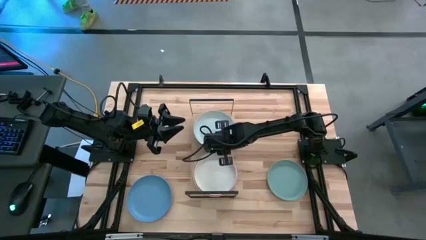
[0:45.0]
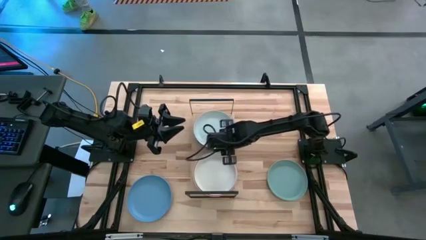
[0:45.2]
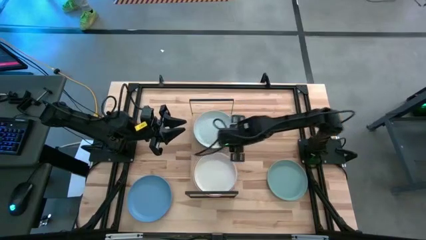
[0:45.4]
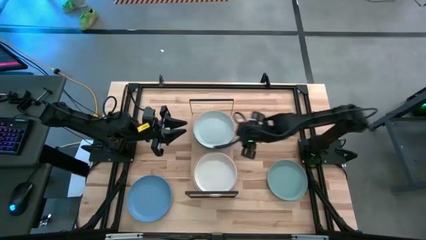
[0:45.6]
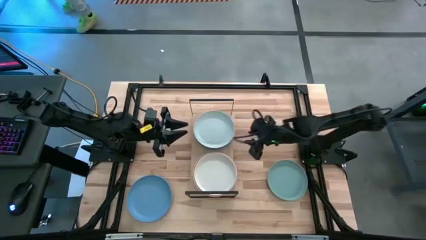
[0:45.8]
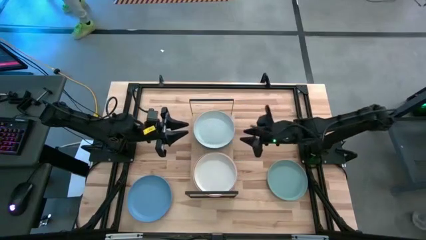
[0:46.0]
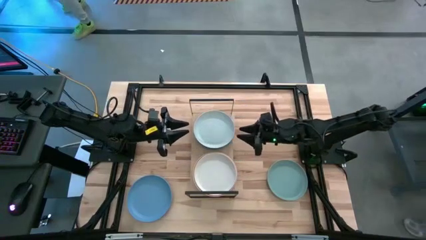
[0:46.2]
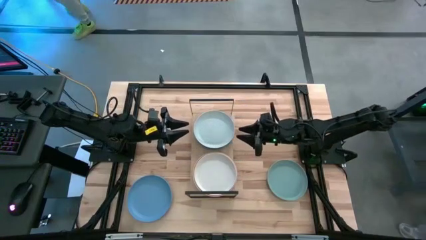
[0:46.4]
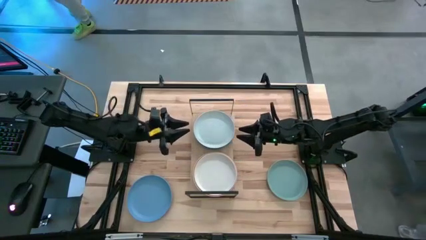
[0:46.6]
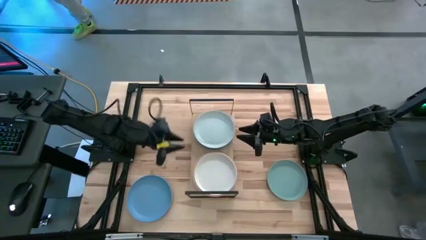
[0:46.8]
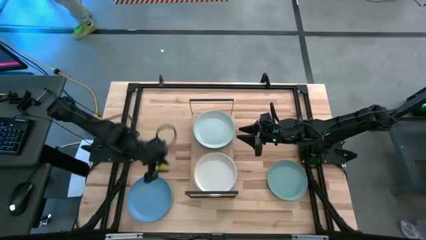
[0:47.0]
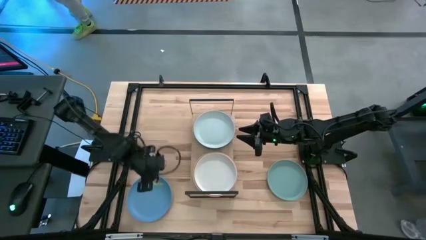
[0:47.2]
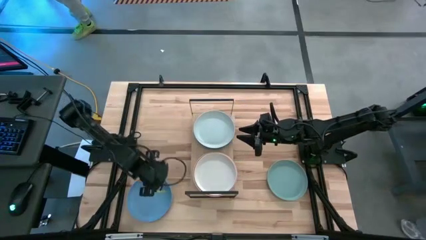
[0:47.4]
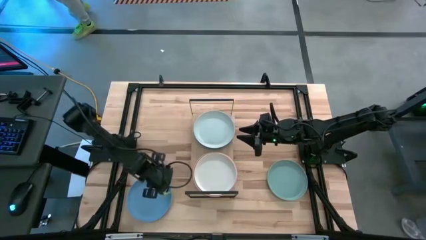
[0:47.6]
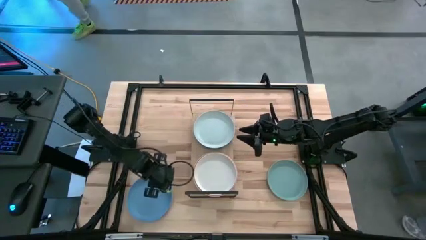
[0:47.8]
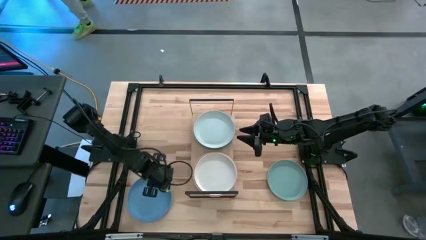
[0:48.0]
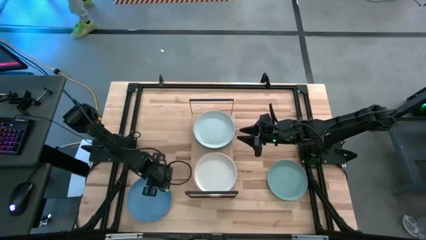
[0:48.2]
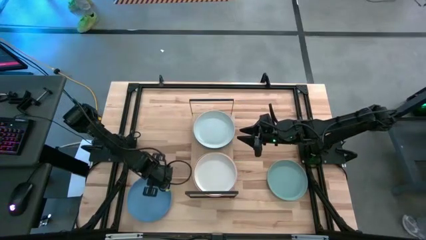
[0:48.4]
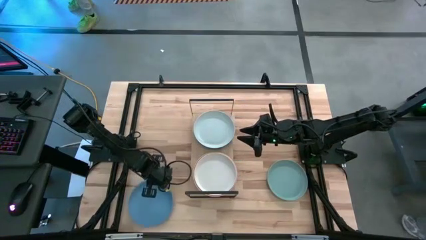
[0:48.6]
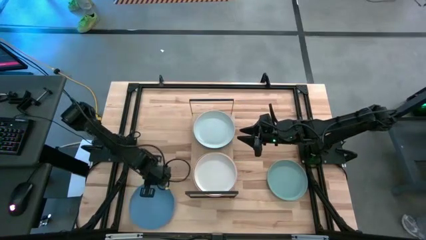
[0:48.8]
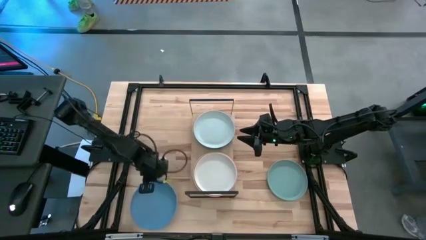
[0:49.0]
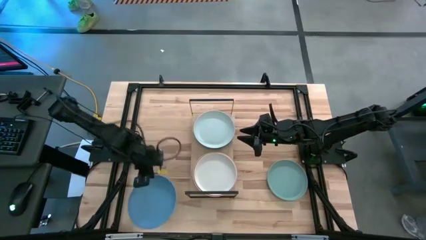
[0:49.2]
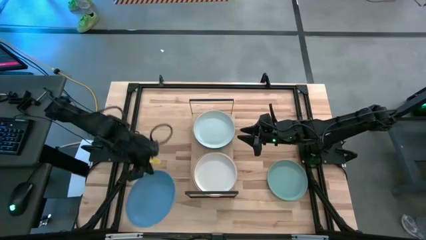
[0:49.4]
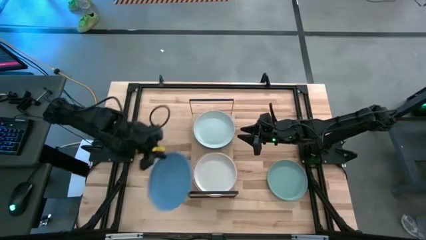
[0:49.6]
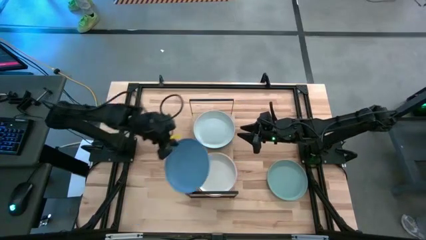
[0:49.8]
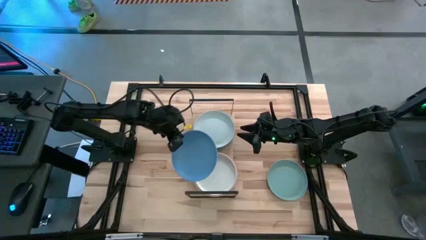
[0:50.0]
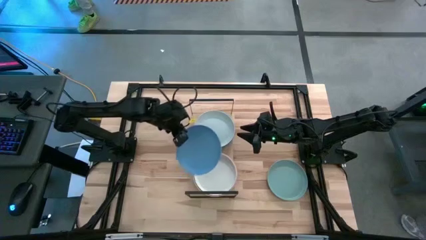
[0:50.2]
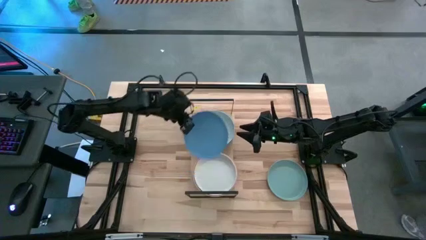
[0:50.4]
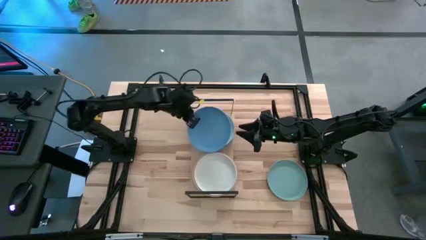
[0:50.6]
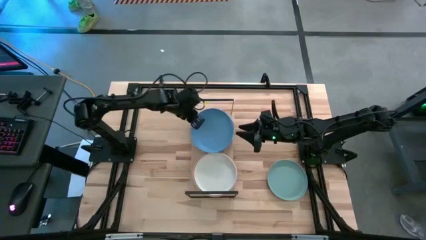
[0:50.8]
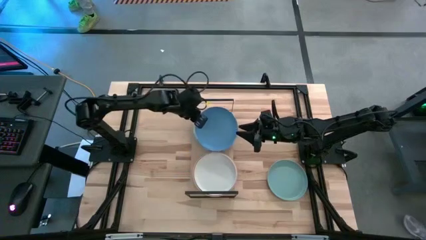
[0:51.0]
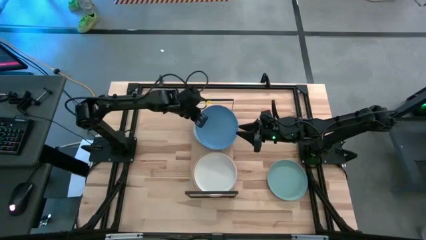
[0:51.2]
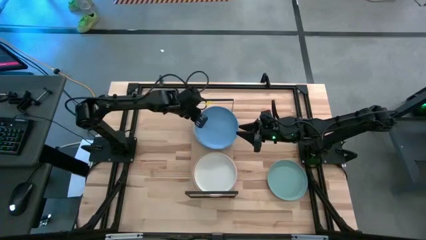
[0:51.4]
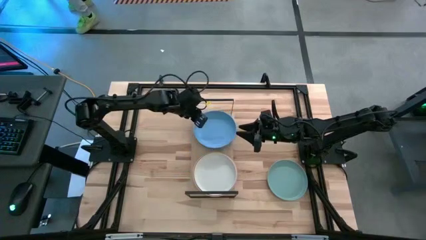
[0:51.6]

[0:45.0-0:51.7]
Task: Place and stack plates onto a shelf
Stack the blue plate on top of the gray plate on the shelf

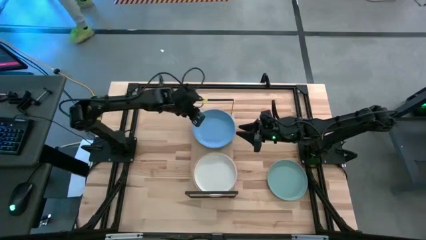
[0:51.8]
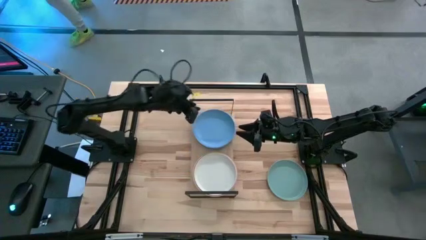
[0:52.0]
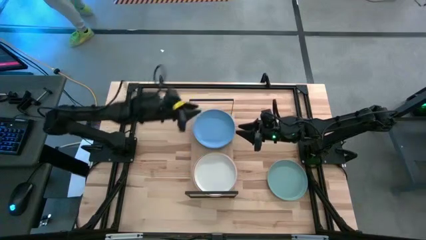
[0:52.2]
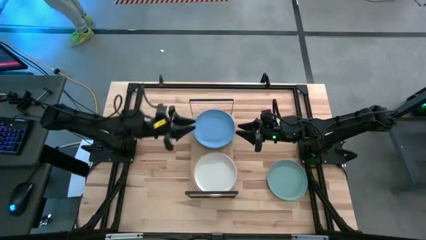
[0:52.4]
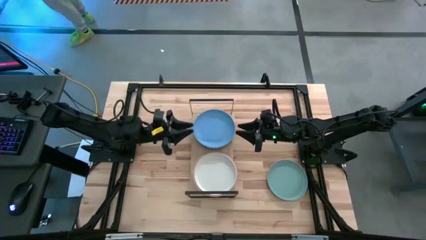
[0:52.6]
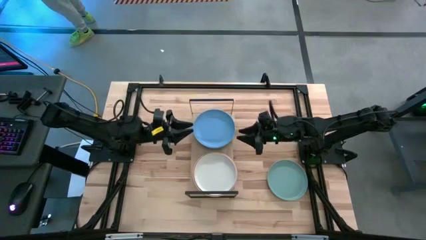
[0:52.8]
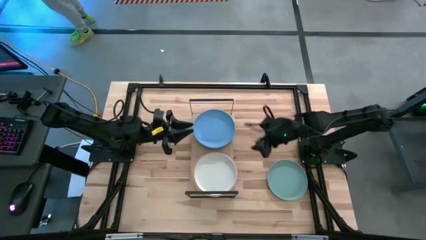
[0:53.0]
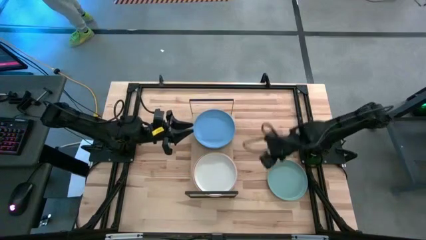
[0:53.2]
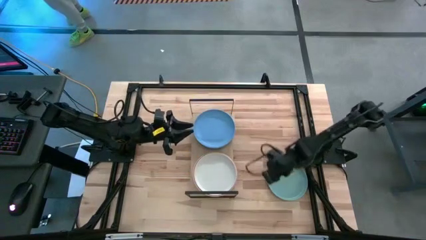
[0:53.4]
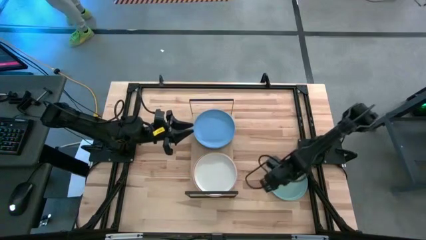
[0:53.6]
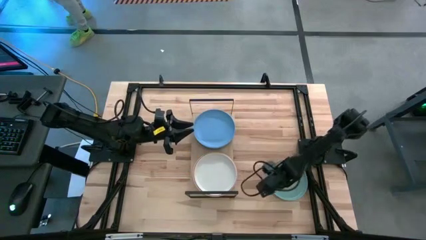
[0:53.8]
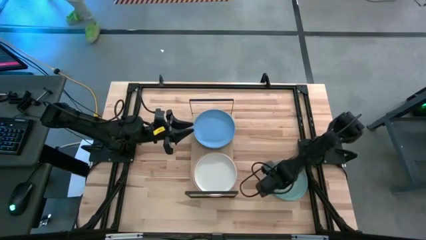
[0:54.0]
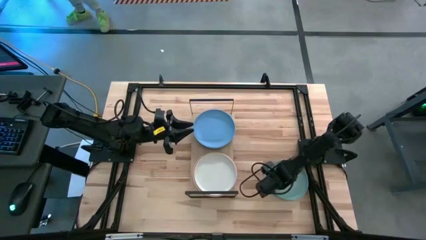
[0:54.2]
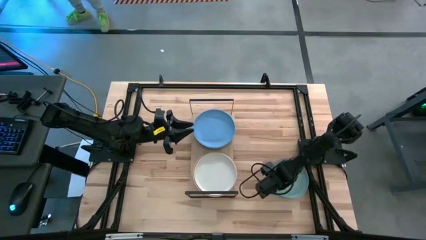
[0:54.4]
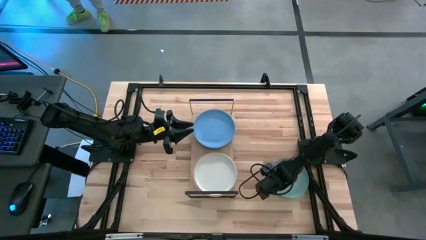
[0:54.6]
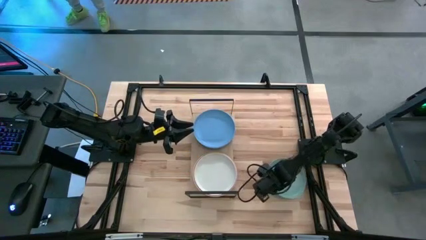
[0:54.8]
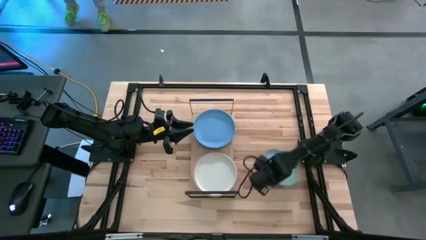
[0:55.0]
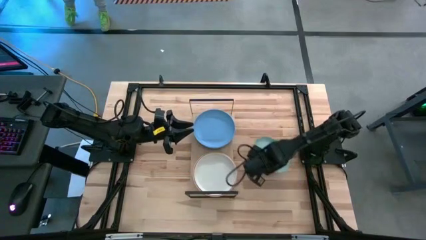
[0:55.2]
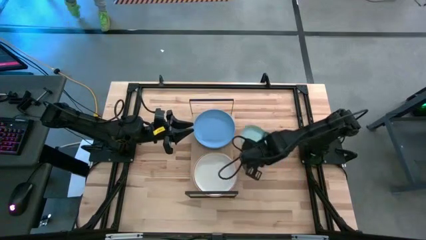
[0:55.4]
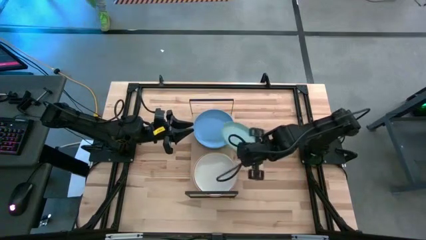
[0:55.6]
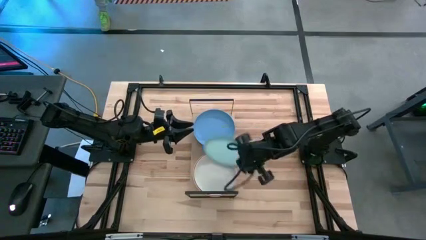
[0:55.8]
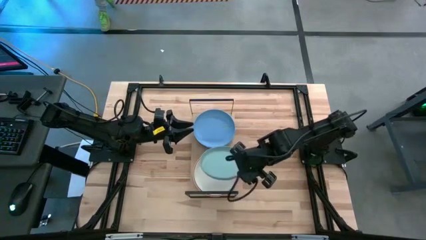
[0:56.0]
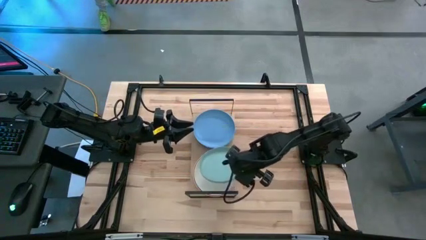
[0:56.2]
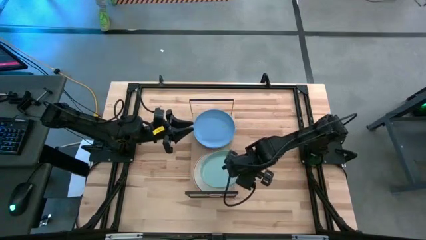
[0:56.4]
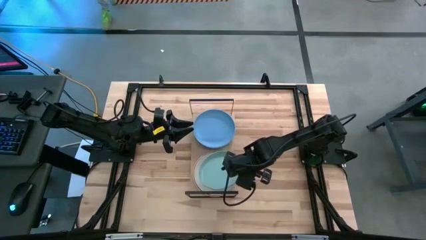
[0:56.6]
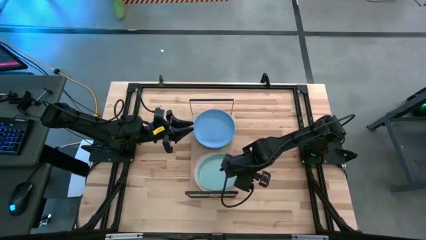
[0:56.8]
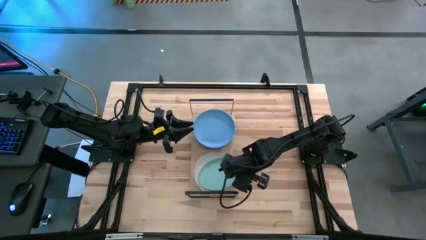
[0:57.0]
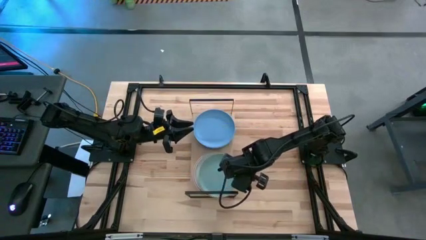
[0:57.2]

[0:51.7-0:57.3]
Stack the light green plate on top of the white plate on the shelf
